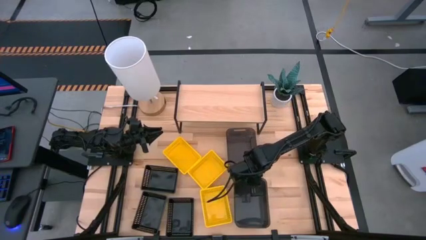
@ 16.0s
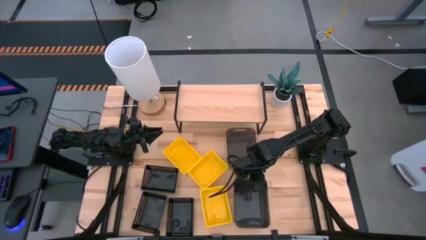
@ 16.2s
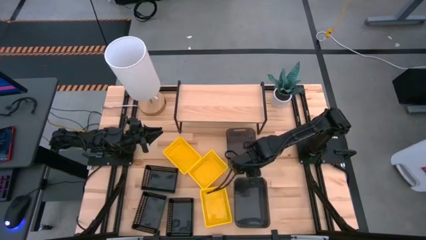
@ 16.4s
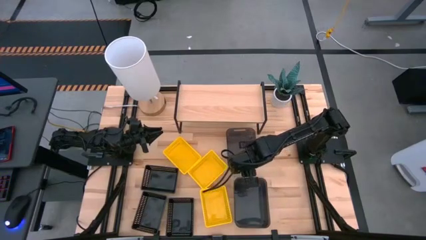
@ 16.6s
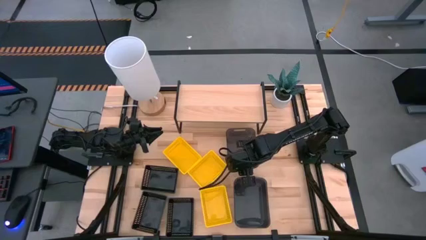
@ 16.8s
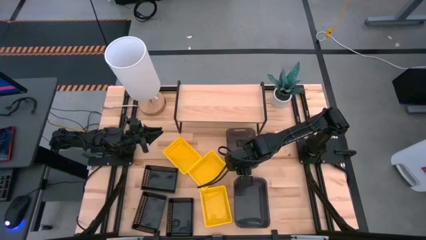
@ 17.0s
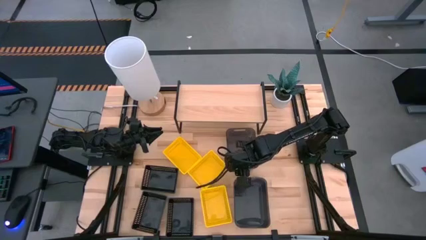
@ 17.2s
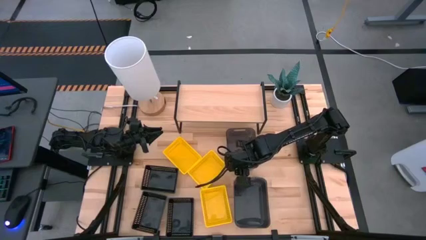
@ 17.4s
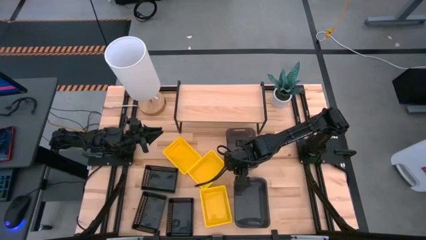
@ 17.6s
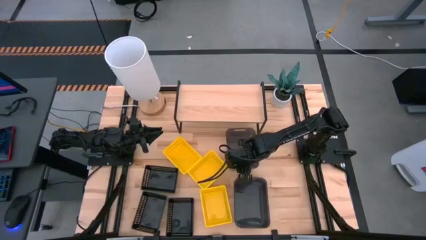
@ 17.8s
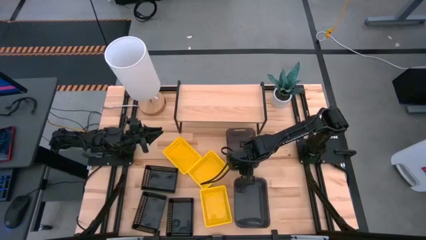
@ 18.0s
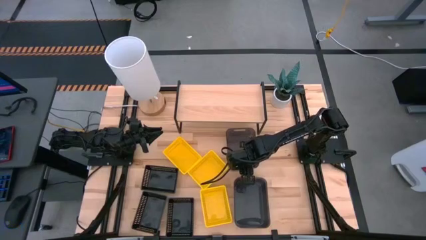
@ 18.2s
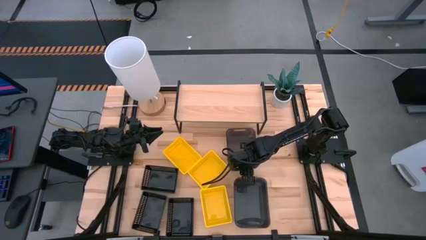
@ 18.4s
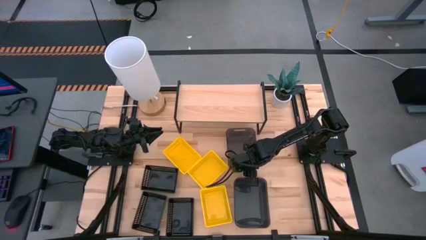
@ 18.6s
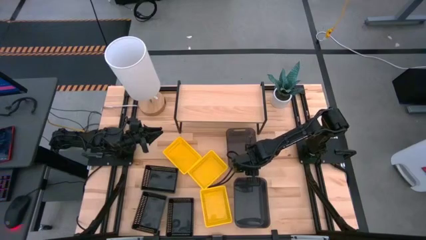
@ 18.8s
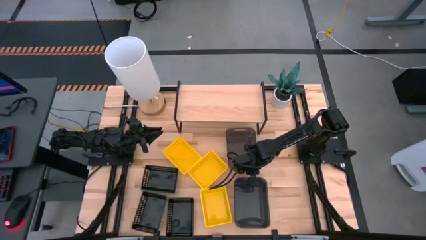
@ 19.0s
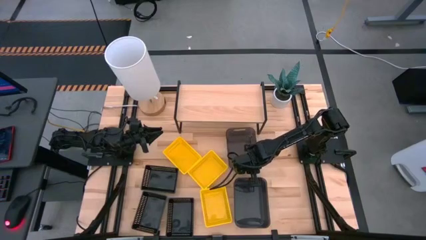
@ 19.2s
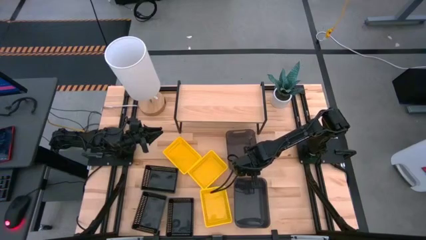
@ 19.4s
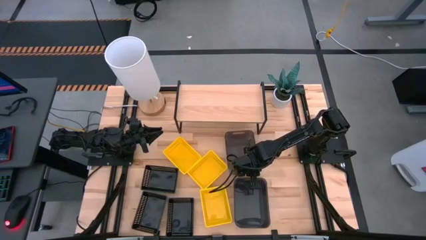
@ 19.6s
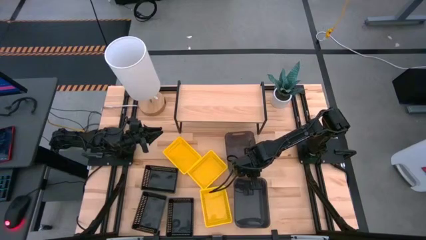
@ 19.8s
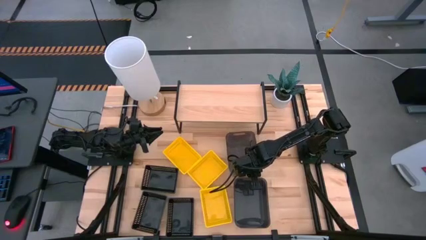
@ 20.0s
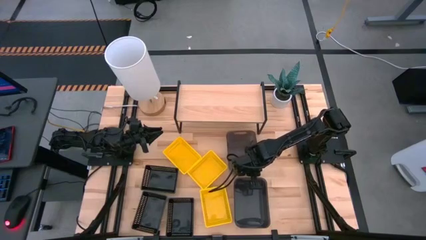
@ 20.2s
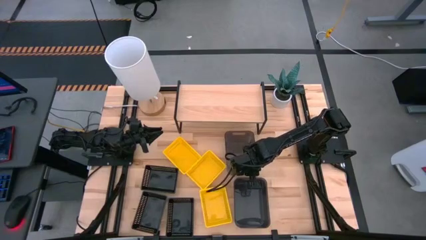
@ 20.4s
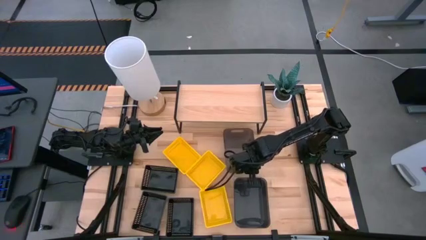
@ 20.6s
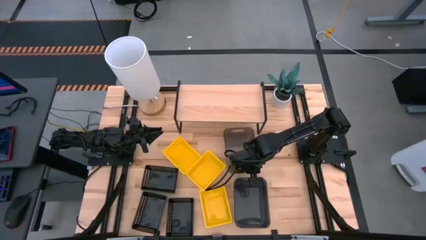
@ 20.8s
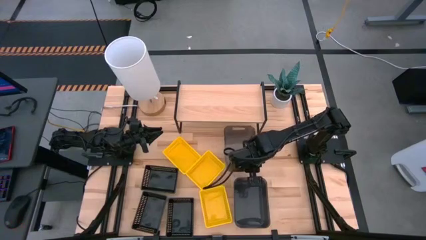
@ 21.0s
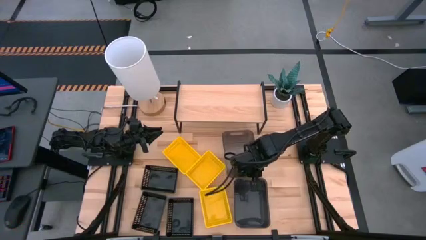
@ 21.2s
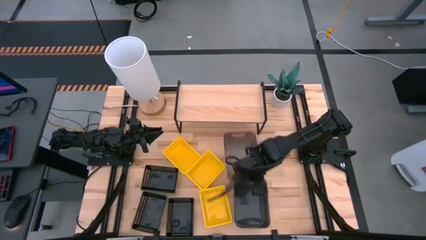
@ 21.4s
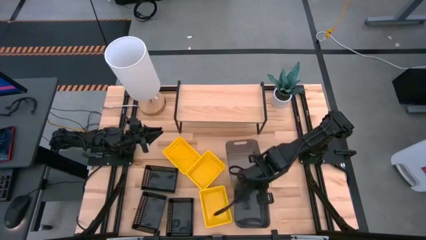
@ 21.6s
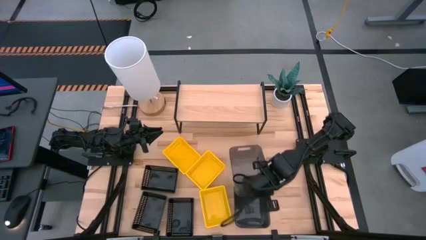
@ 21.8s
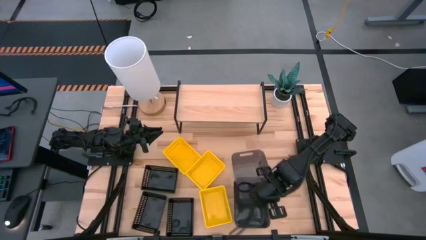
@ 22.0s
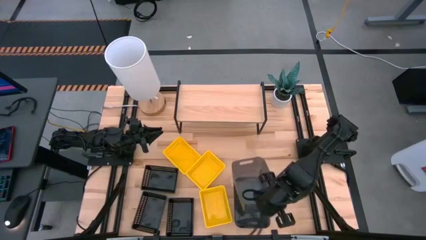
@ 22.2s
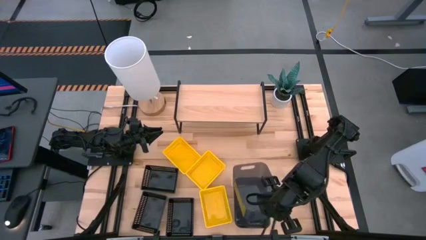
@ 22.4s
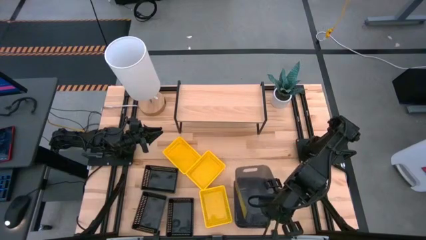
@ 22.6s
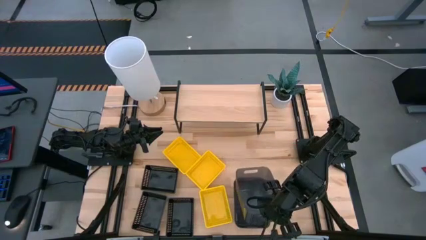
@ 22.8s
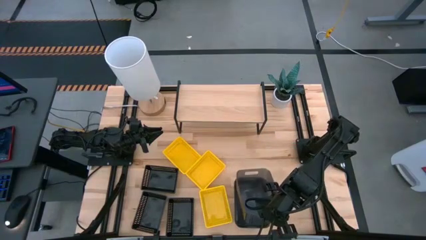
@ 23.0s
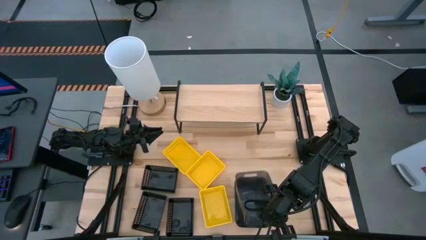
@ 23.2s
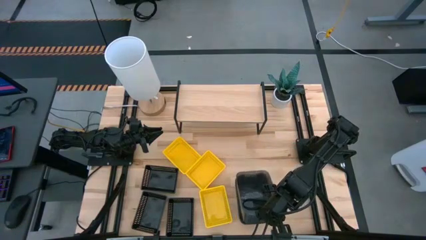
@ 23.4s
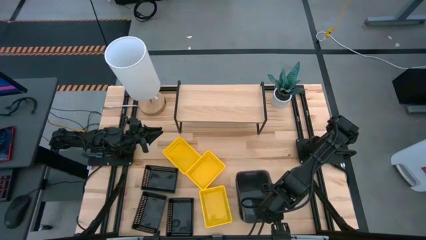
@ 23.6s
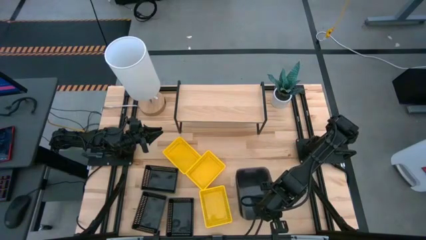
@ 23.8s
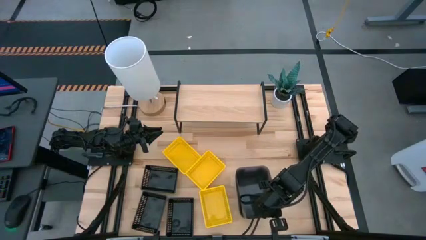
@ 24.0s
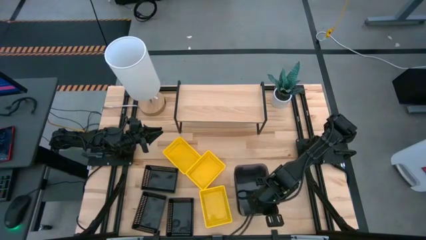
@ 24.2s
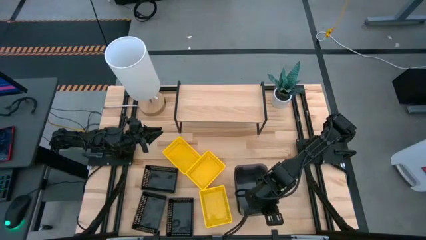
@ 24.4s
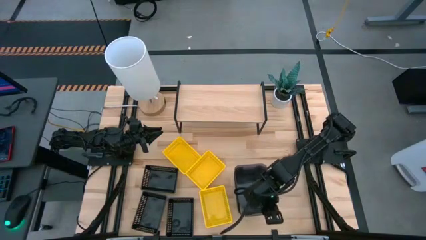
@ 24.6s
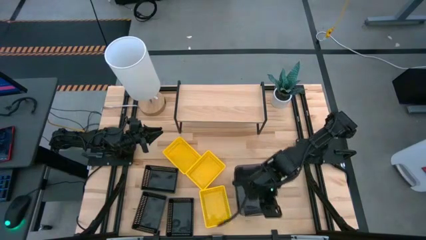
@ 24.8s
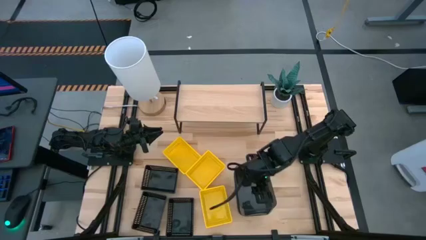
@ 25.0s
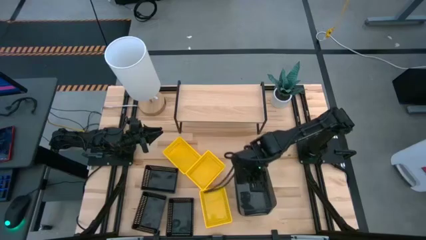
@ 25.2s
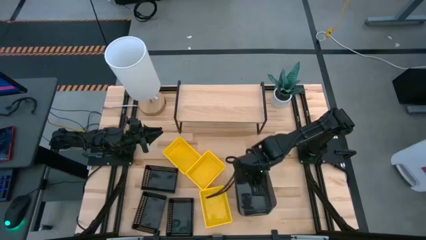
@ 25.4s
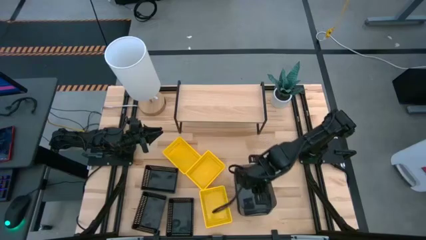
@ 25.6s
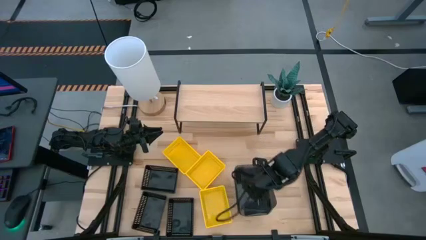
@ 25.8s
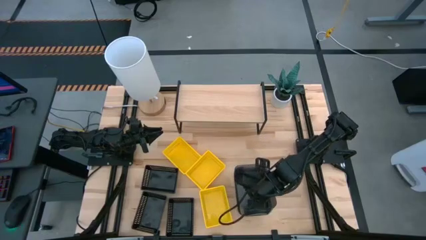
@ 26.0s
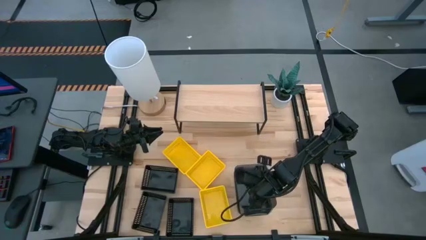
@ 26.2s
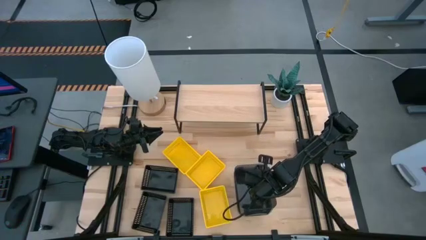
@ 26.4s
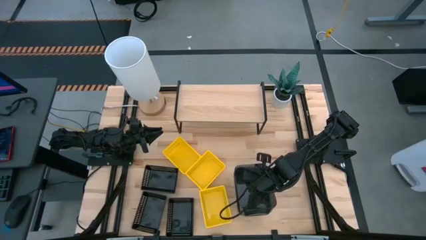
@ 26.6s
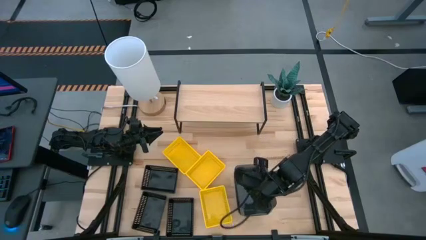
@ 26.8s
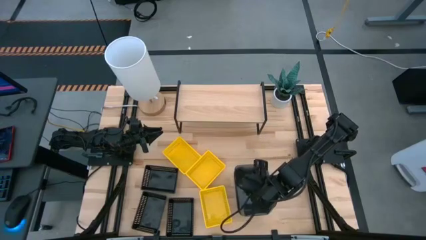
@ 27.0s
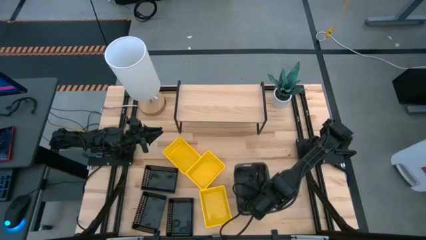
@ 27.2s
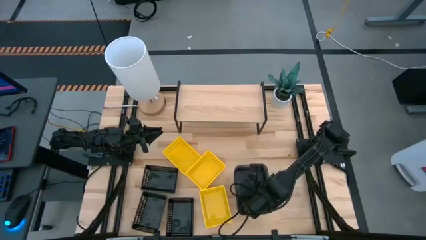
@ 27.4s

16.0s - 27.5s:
Task: Stack baskets on shelf by color
Stack the transparent black bin on top of the transparent black bin

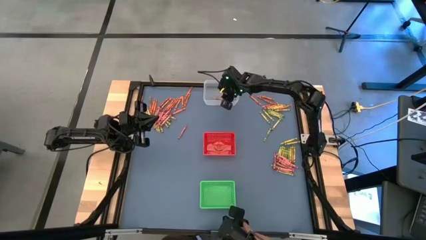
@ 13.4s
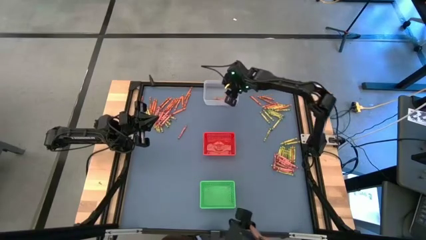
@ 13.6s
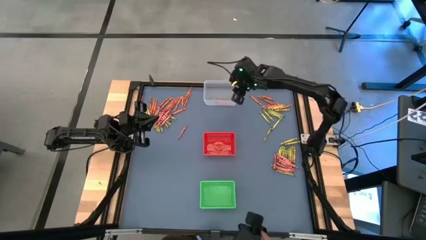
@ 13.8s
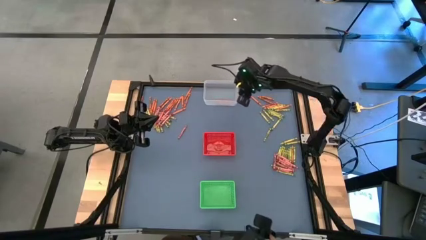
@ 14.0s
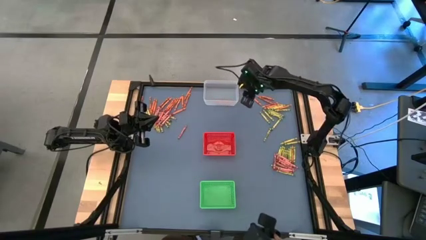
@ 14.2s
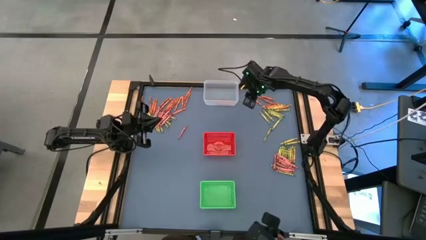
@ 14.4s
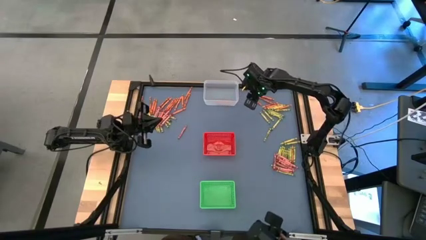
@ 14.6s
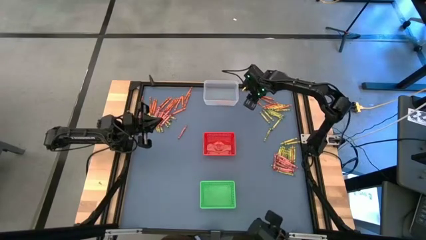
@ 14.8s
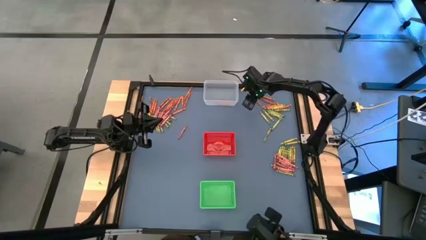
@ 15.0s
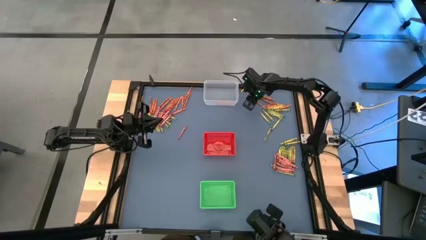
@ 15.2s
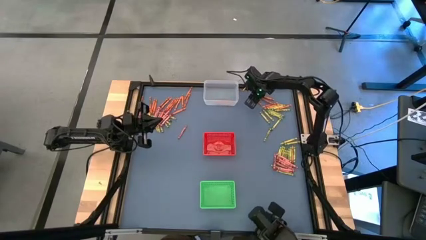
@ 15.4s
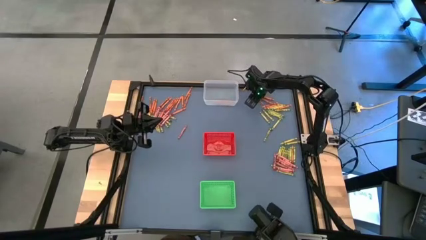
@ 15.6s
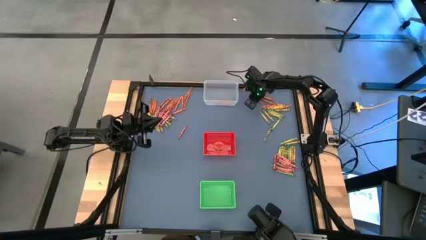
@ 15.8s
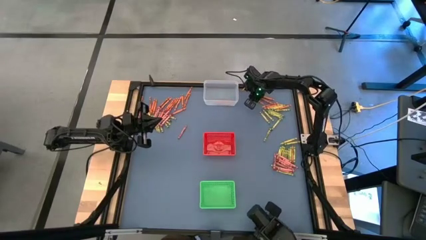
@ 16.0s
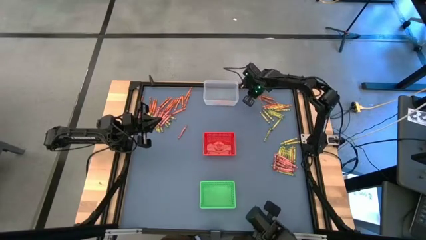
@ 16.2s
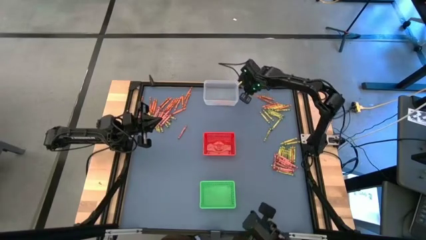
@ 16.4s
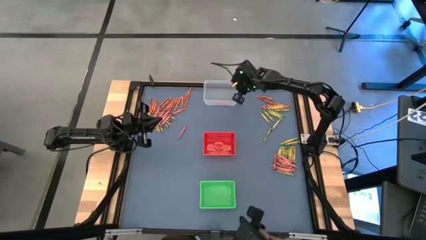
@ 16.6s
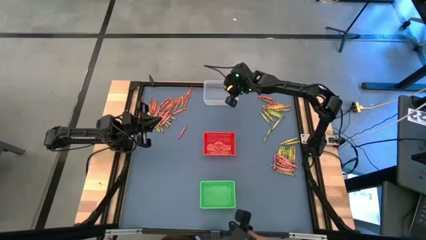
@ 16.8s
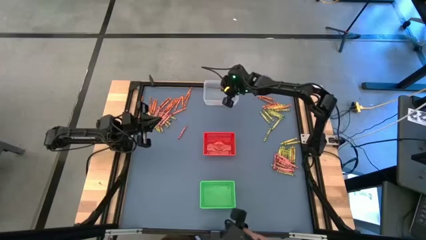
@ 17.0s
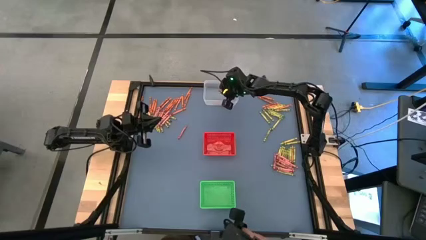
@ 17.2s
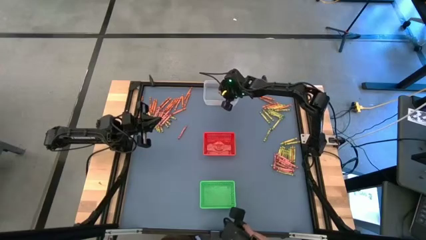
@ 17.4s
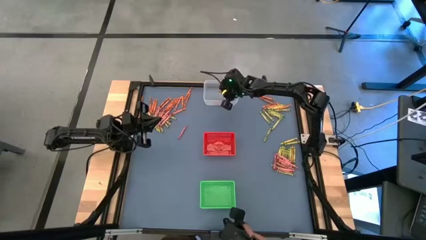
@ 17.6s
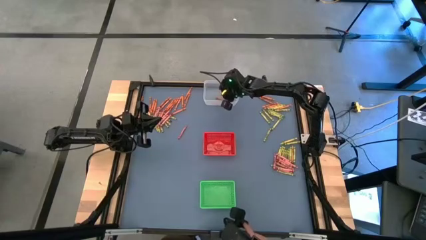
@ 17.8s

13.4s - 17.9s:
Task: Sort crayons
Put the orange crayon into the transparent bin
